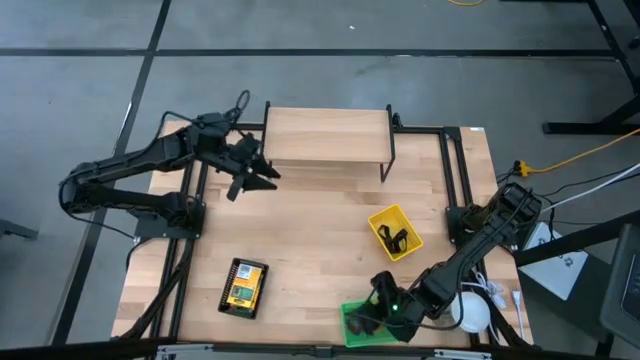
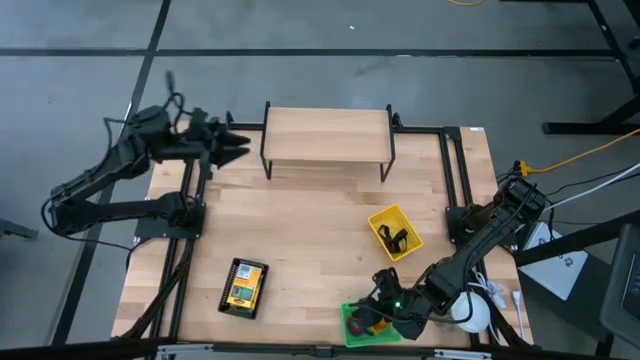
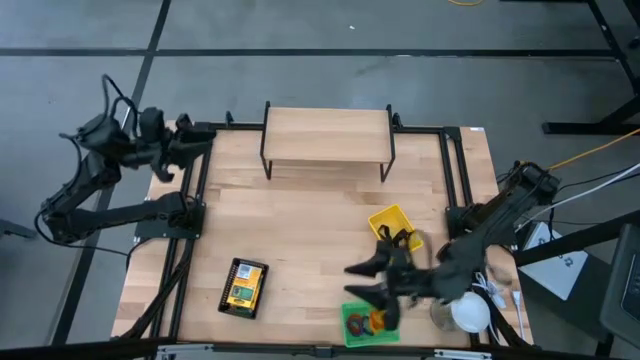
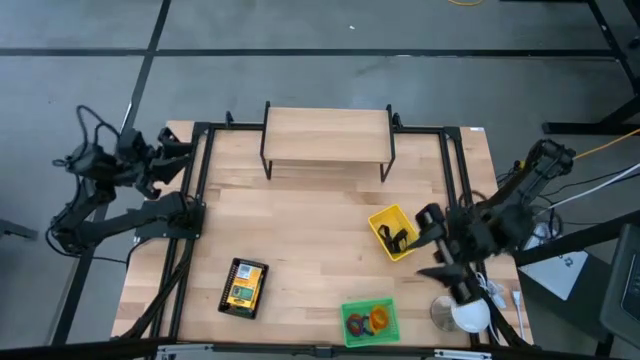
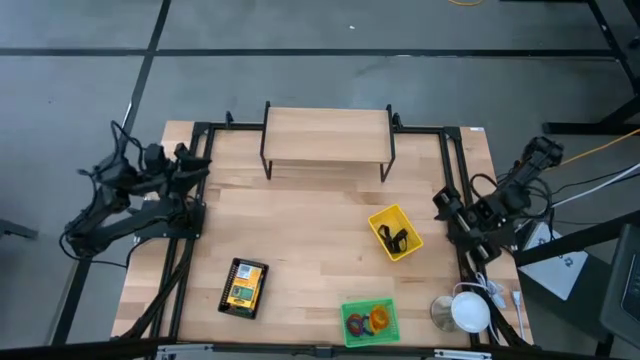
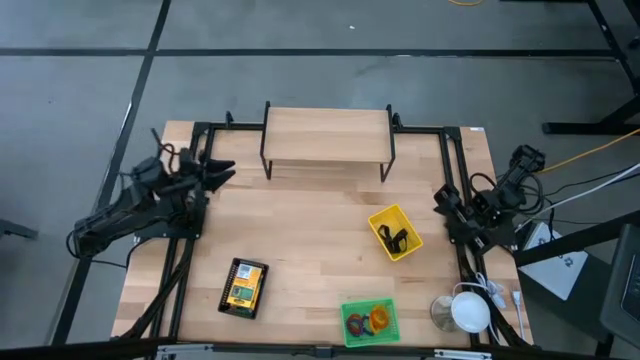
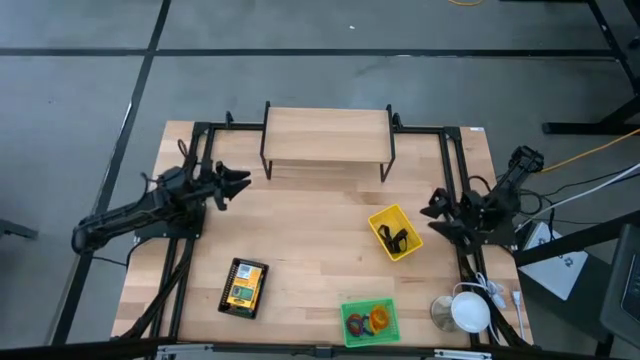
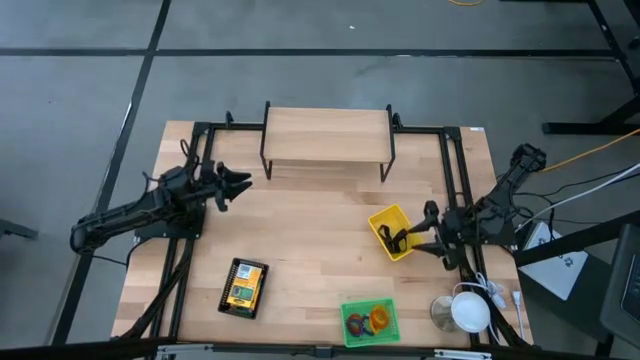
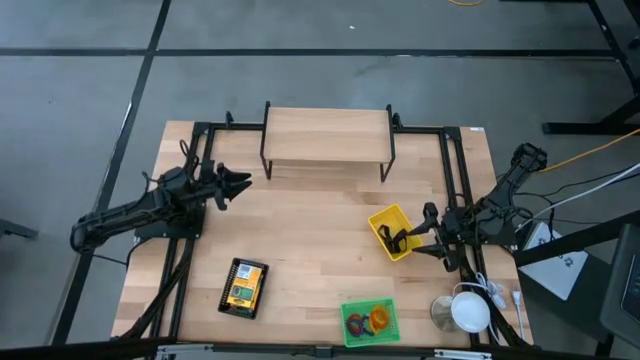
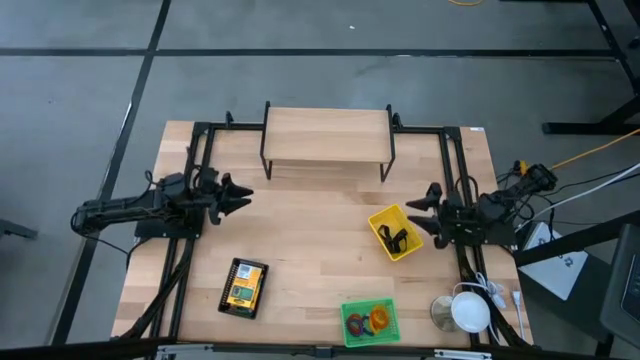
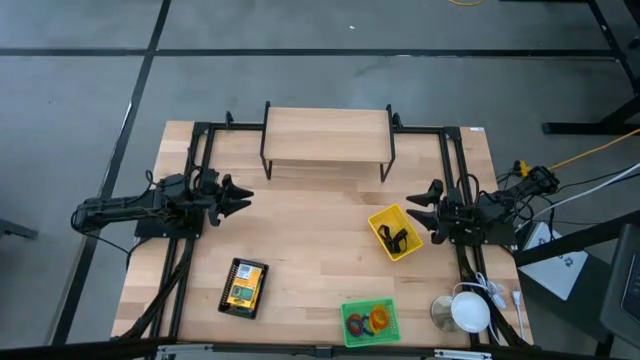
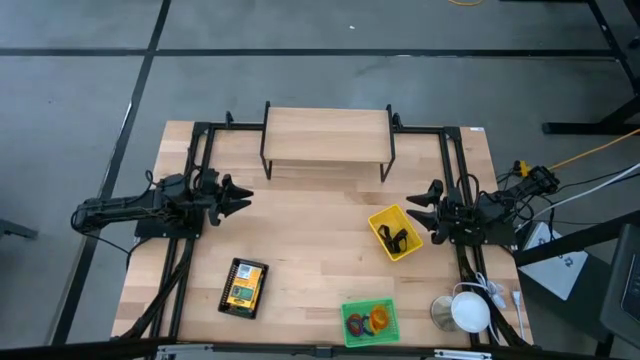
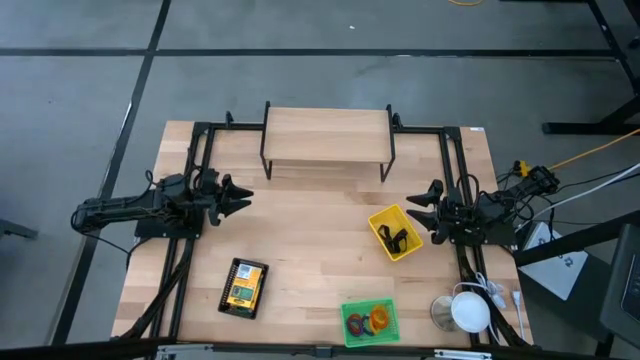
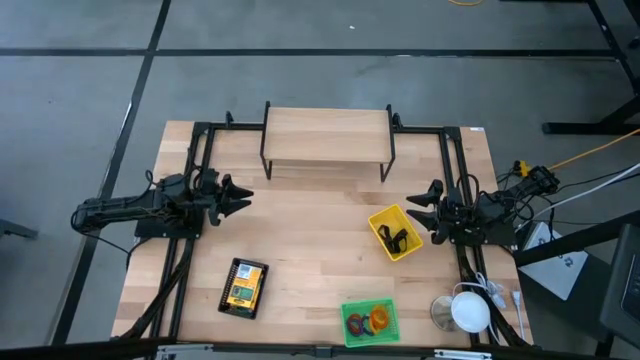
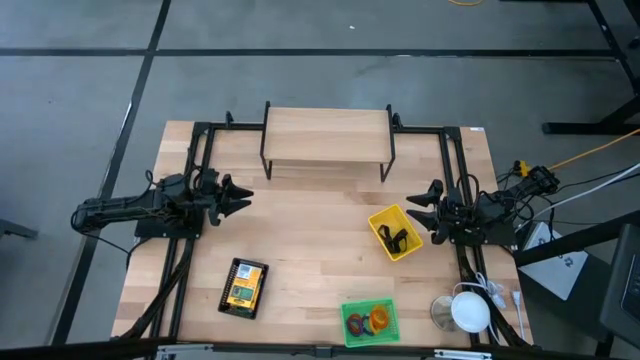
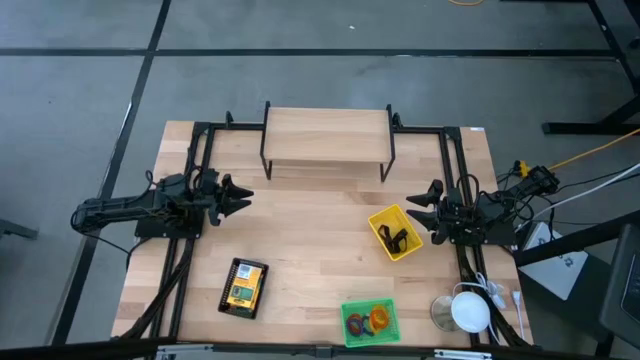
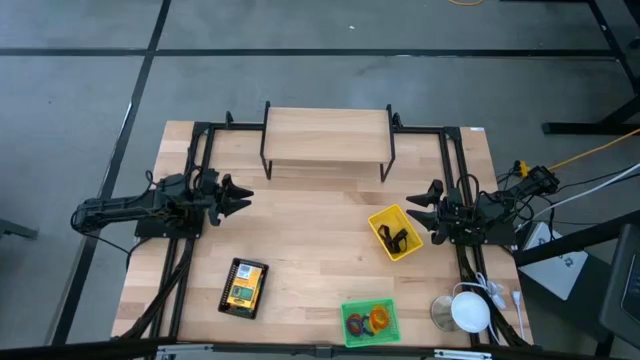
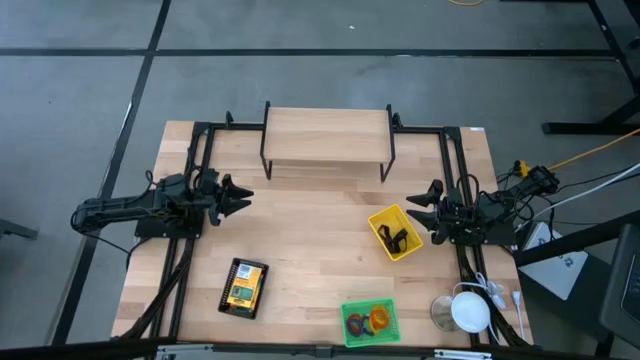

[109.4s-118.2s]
Task: Pick & Place Office Desk Supplies
Return to Home Position

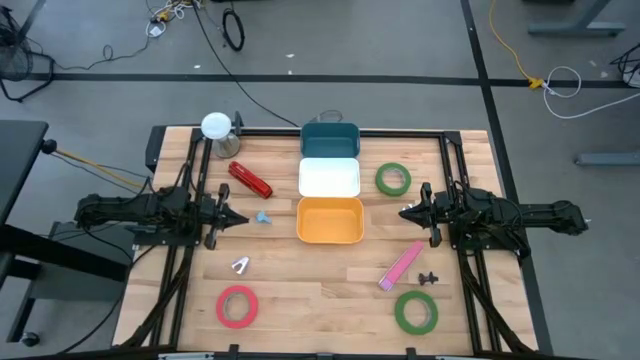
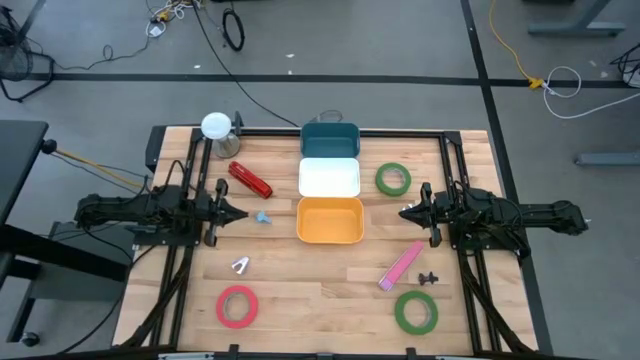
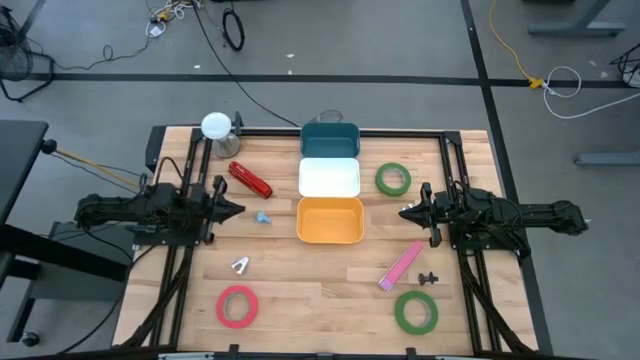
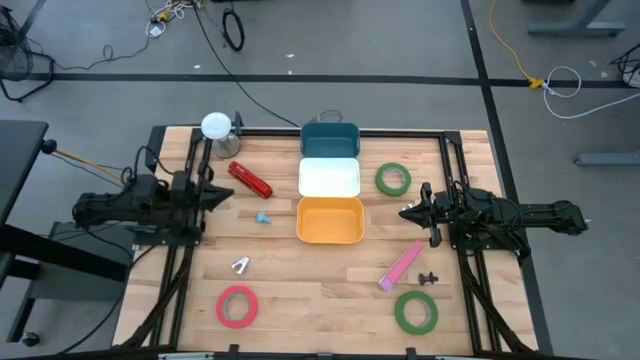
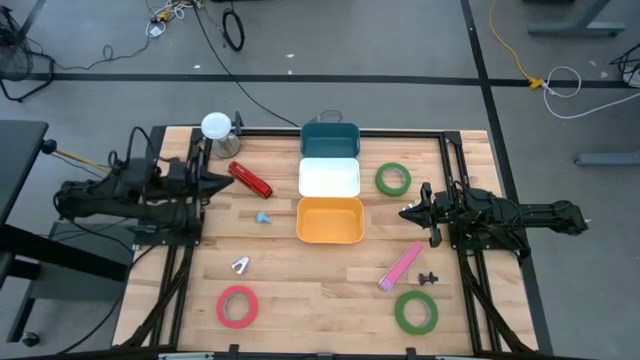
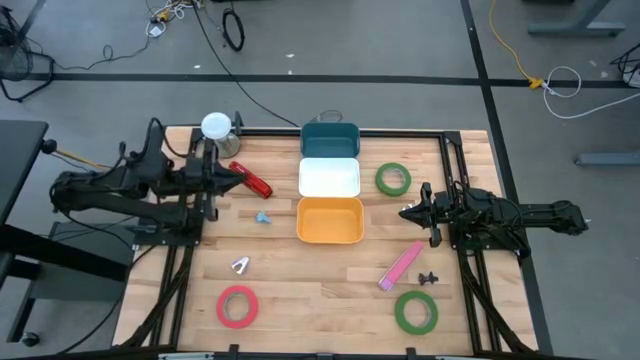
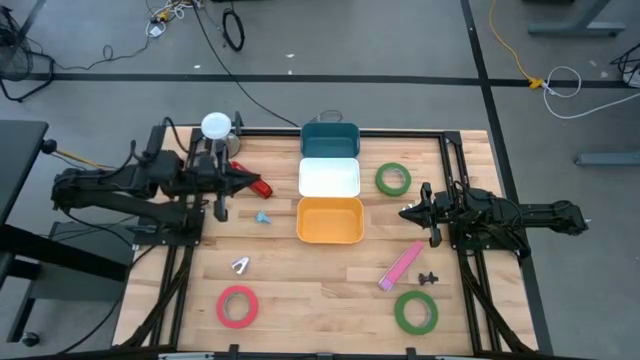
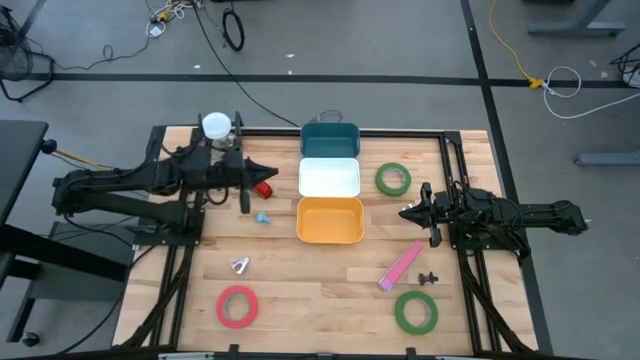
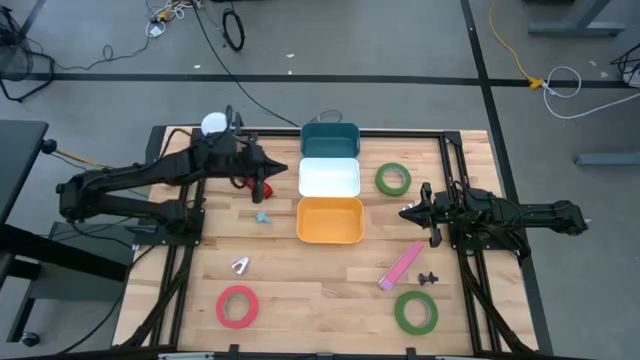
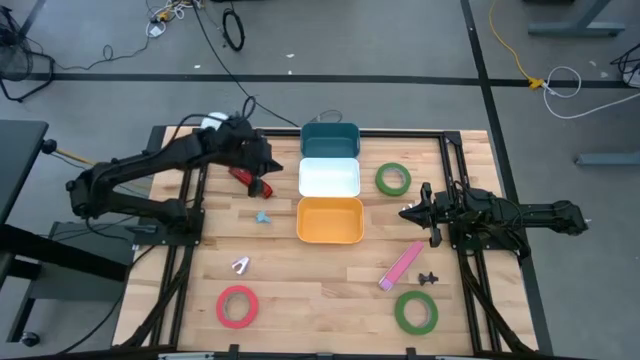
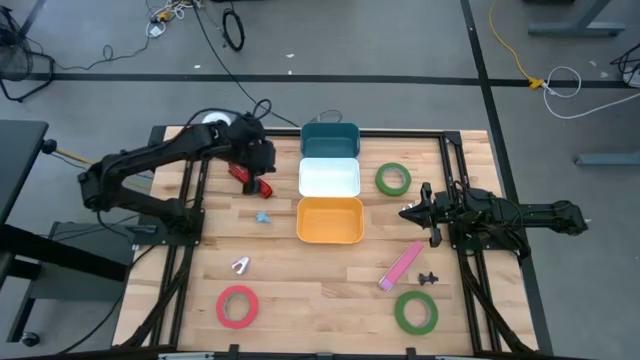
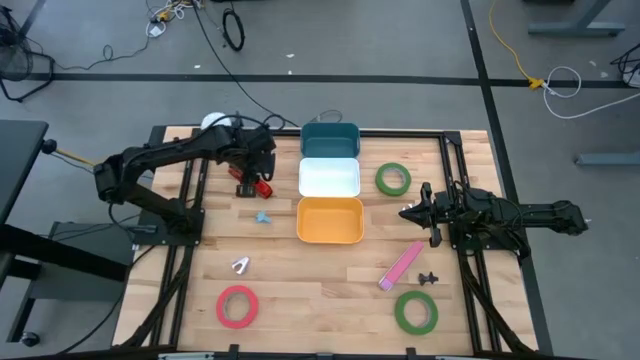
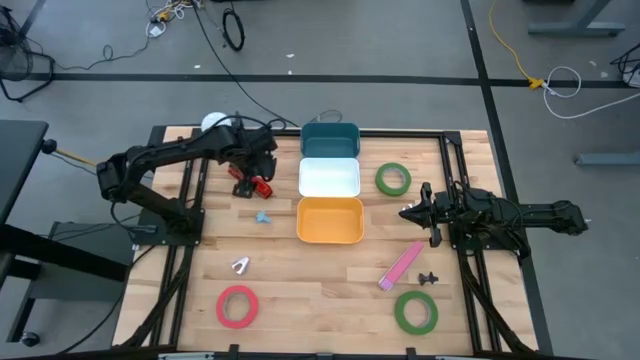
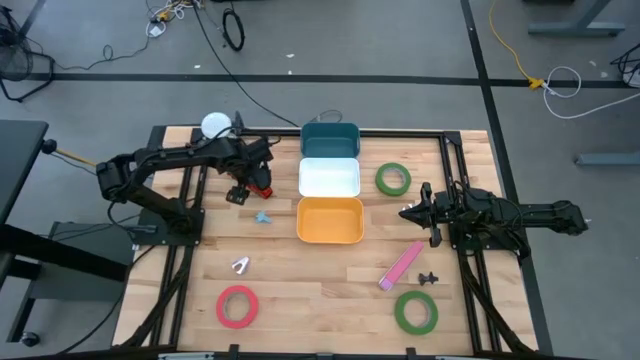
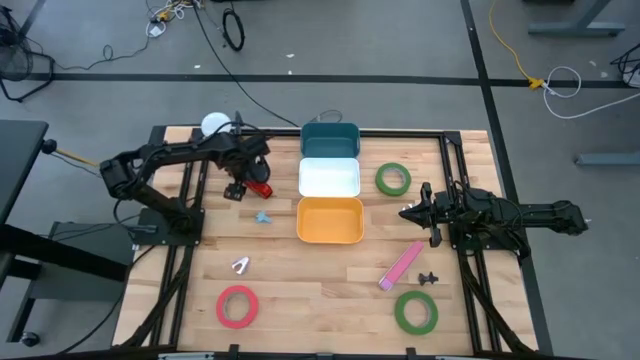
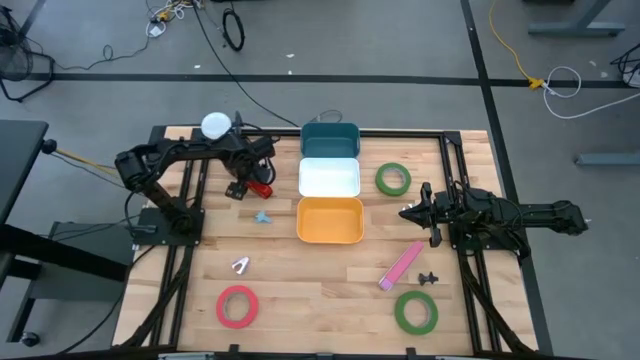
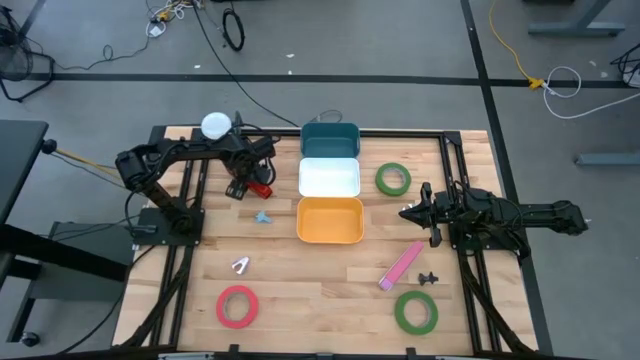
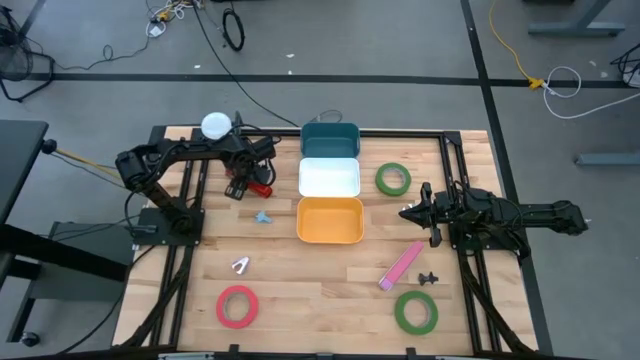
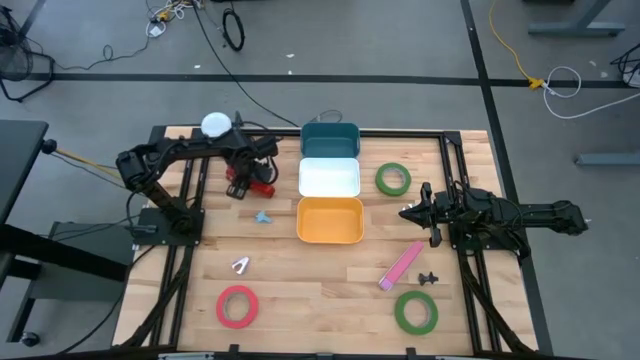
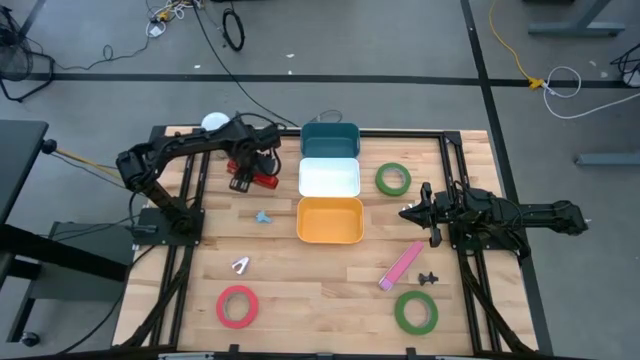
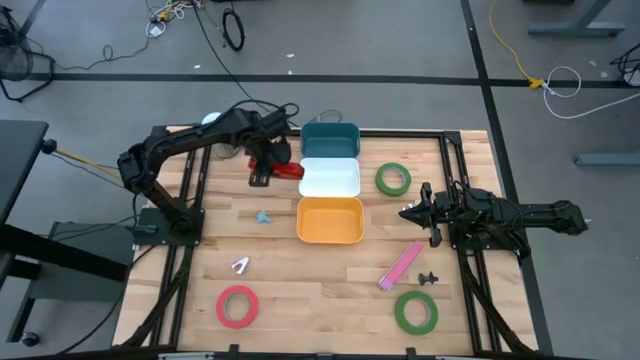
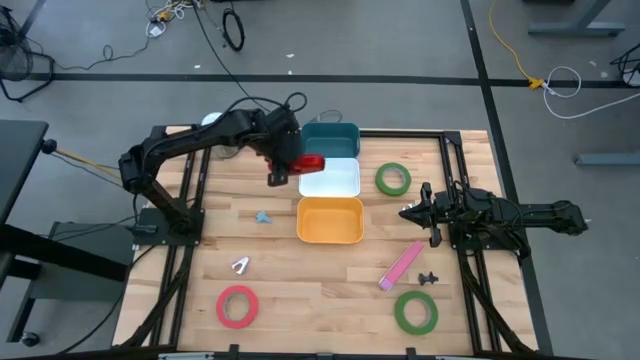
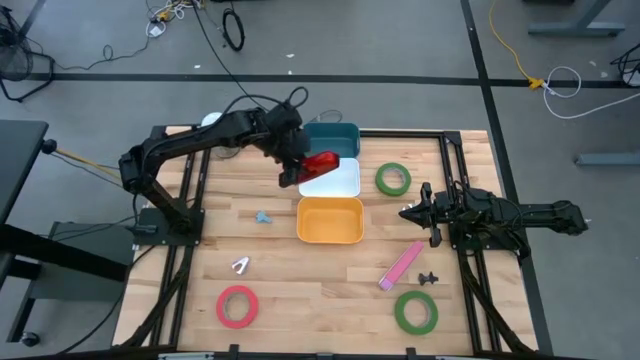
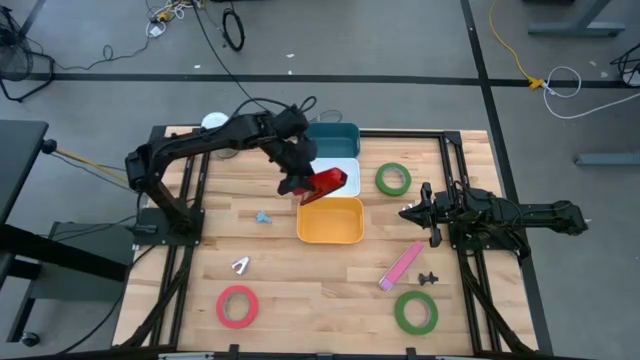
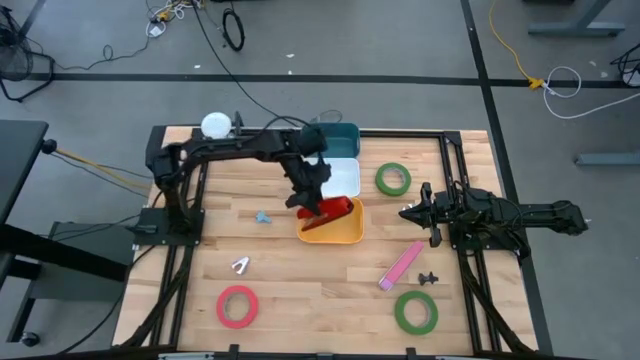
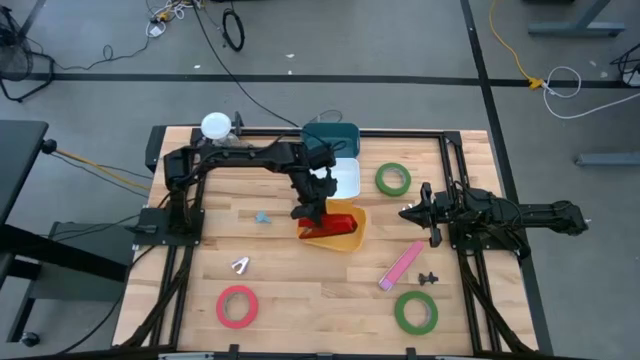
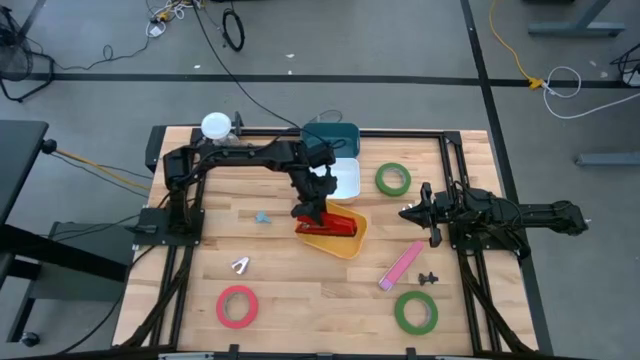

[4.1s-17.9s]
Task: Pick and place Stapler, Stapler remover, tape
Put the red stapler into the yellow bin
